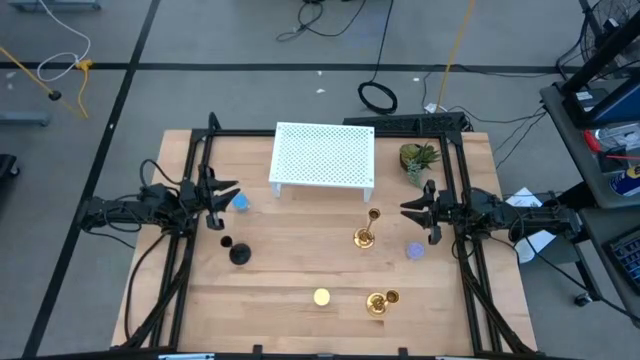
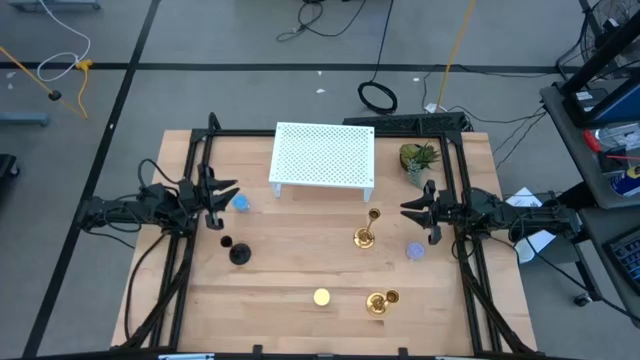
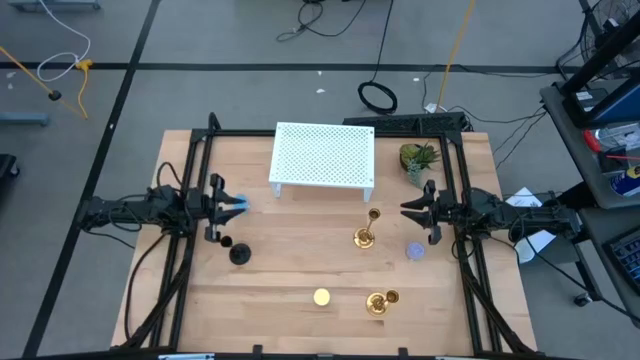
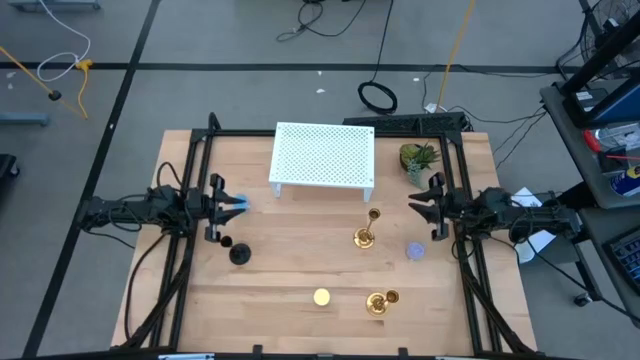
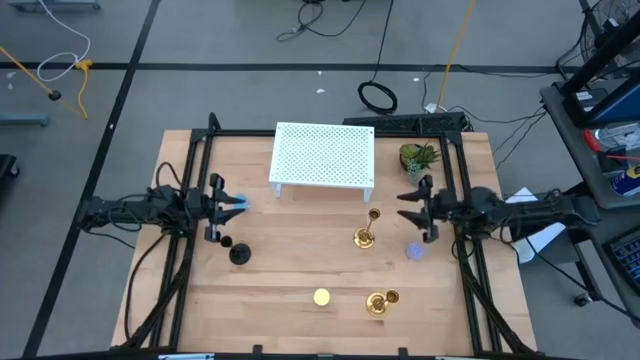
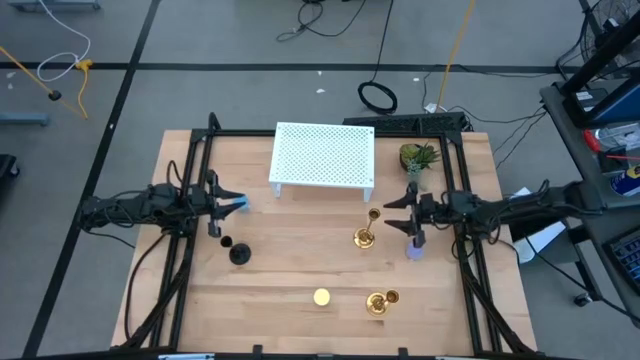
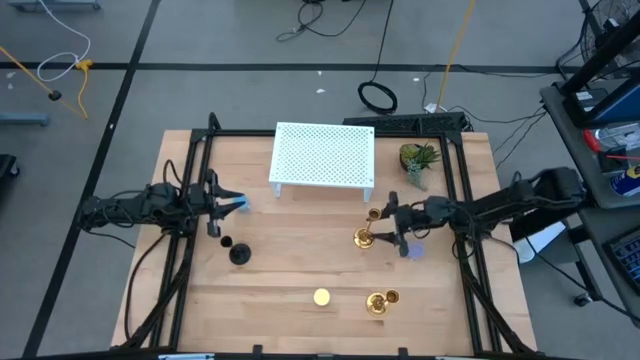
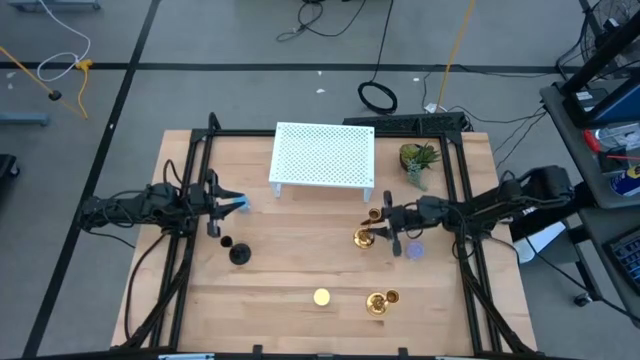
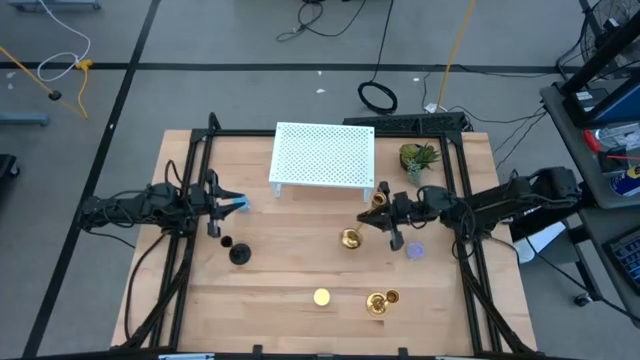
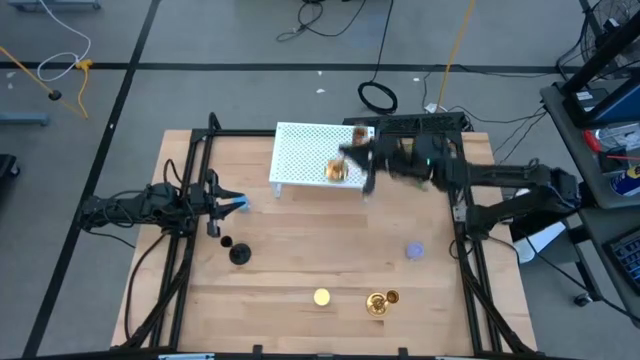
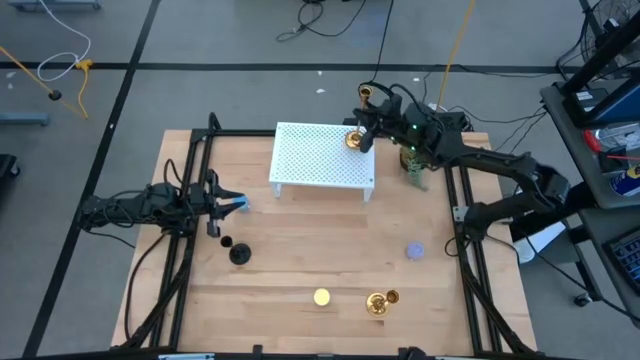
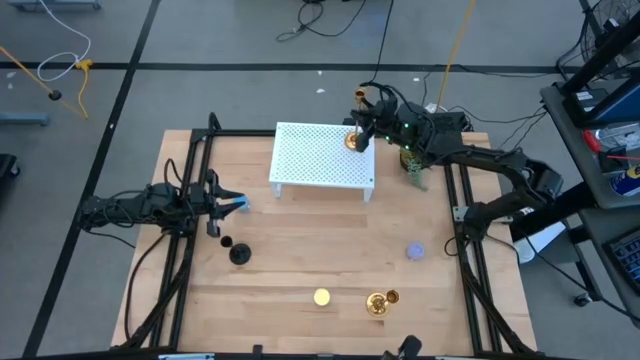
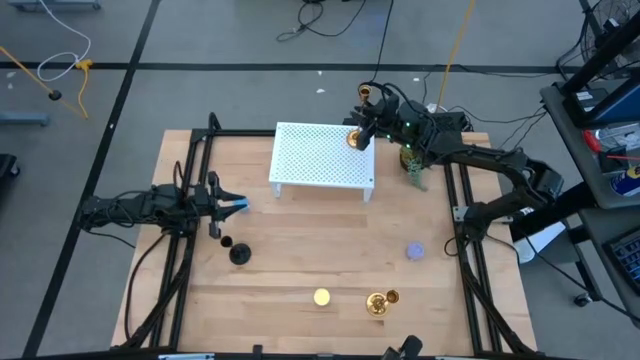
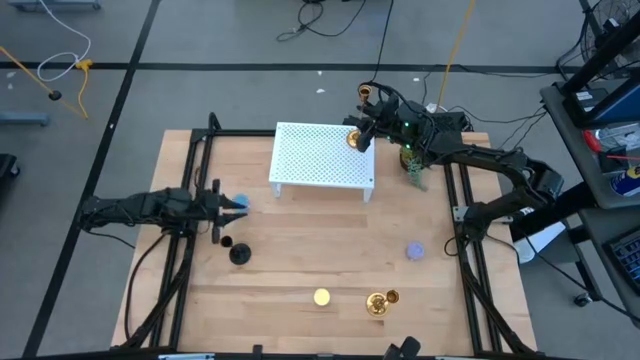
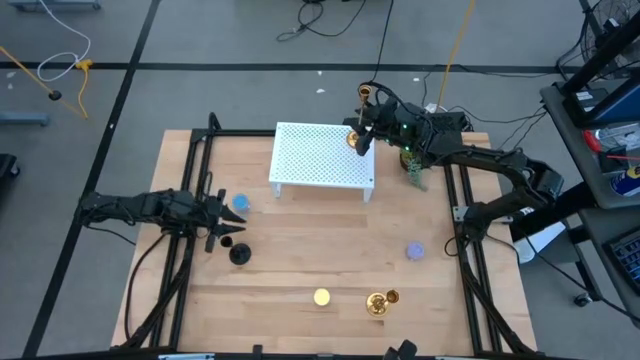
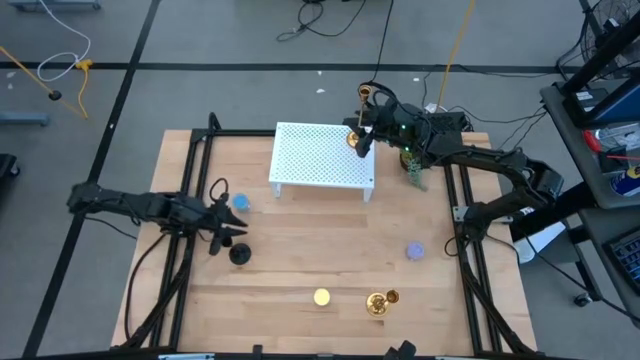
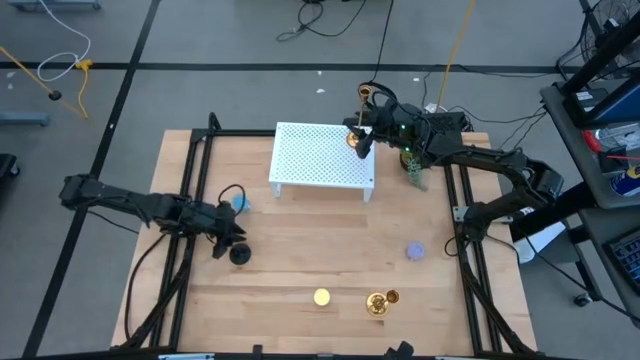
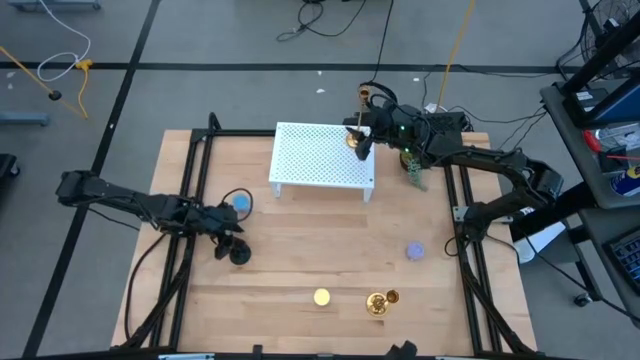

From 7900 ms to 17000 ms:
Task: Pick & Place candle stick holders
Put the top gold candle holder on the shelf

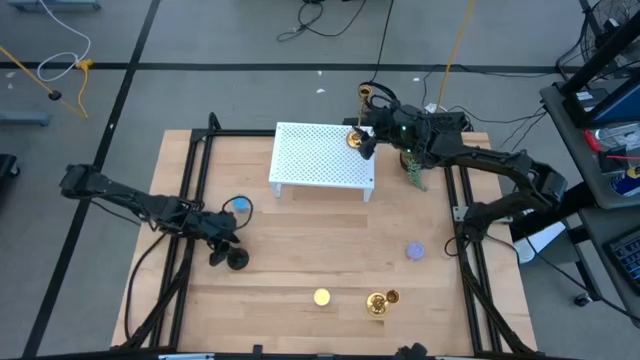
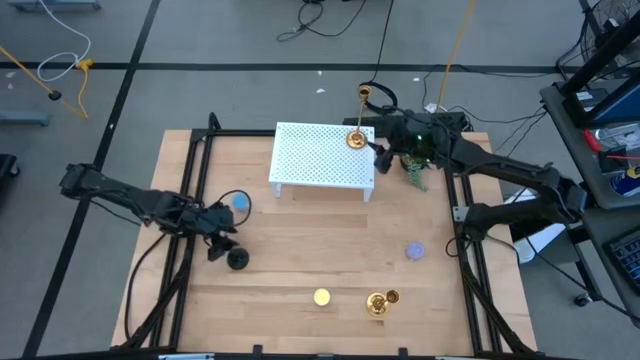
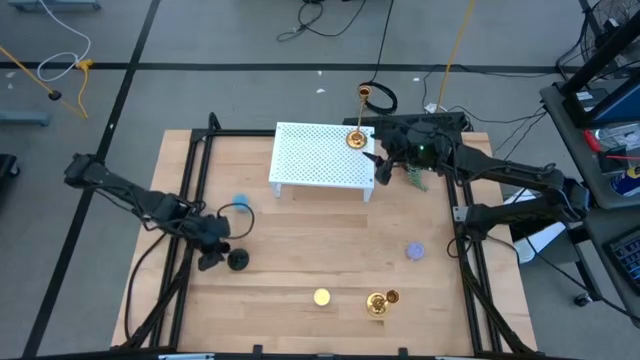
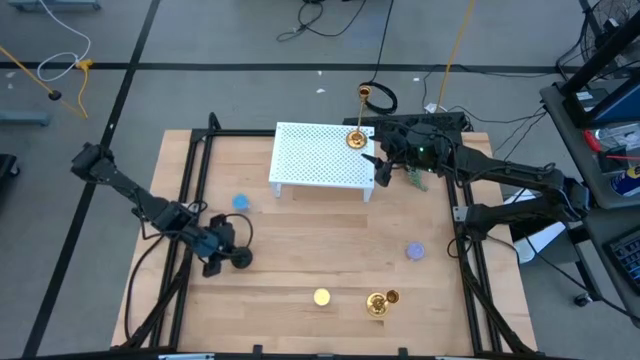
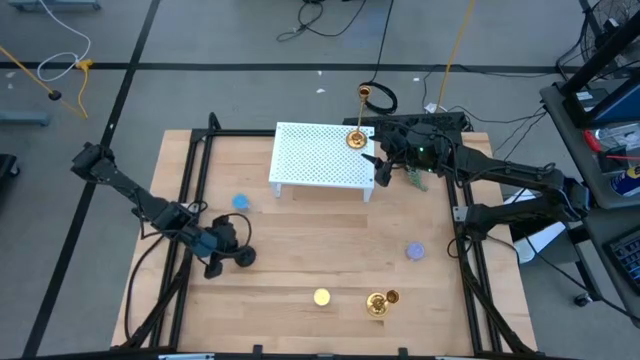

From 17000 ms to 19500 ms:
Put the black candle holder on the shelf

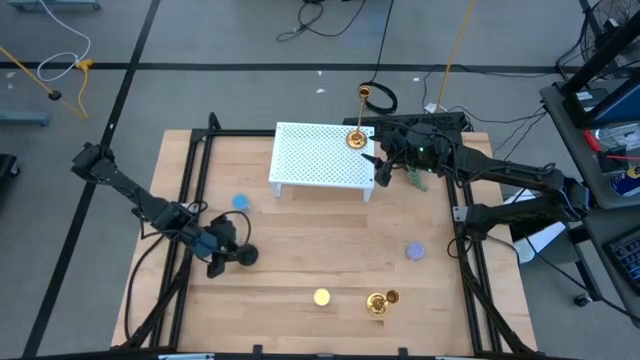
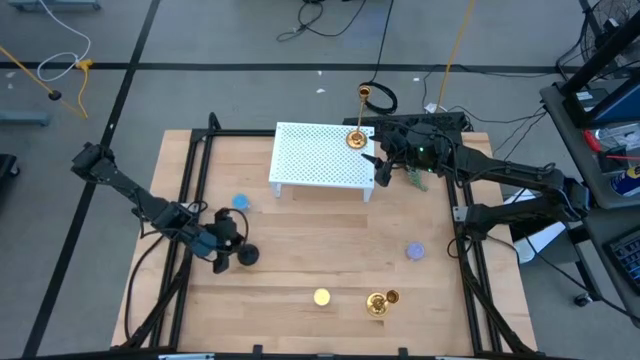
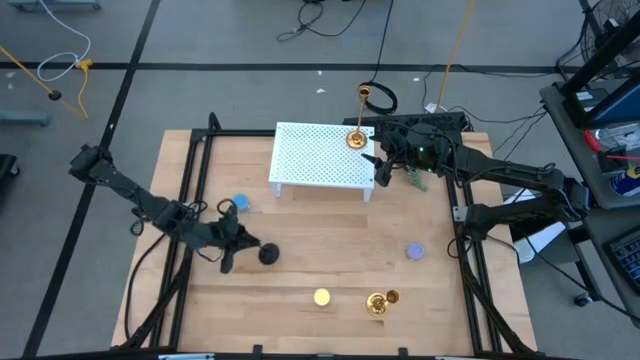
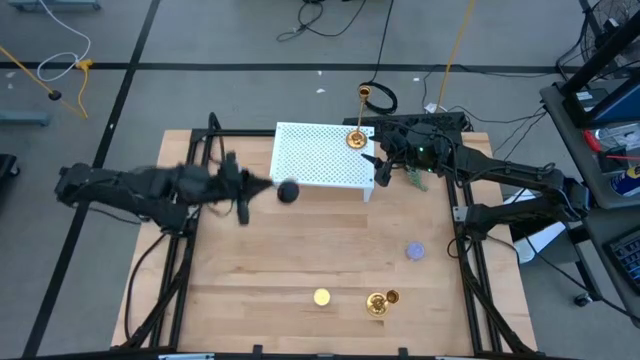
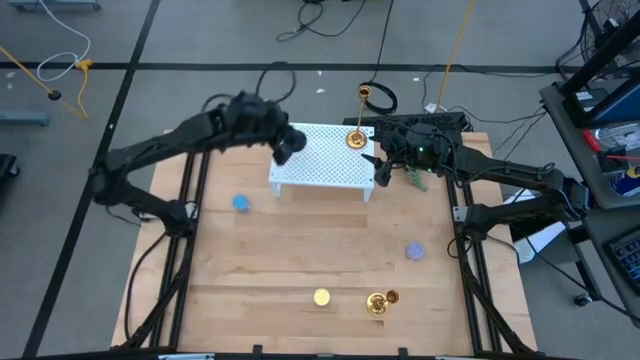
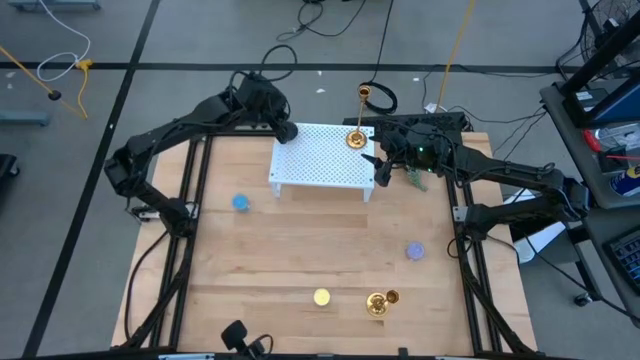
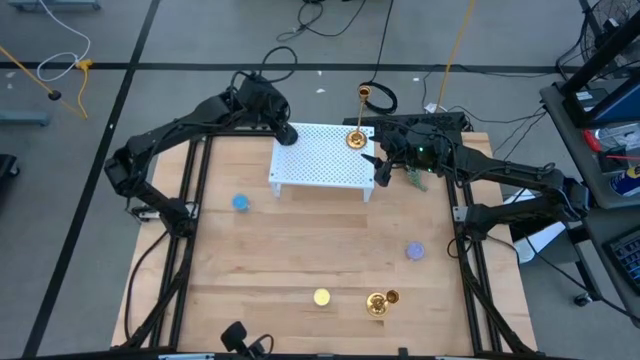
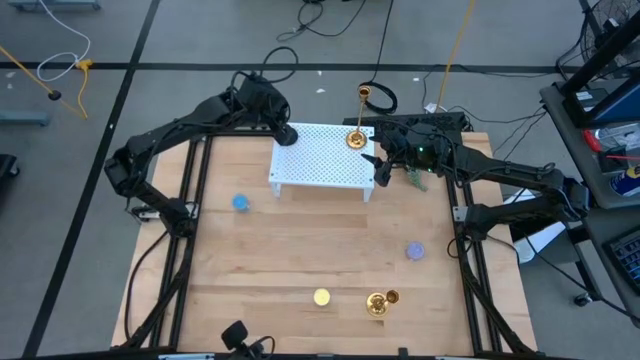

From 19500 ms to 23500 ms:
Put the black candle holder on the shelf

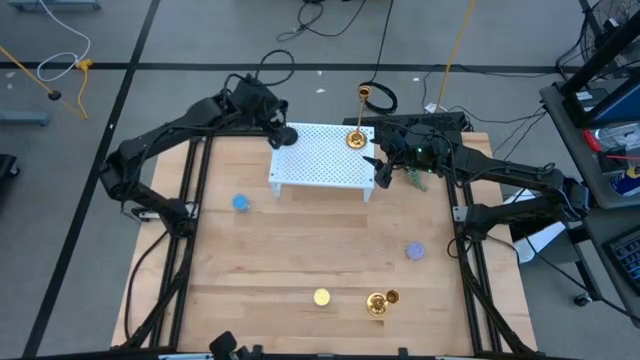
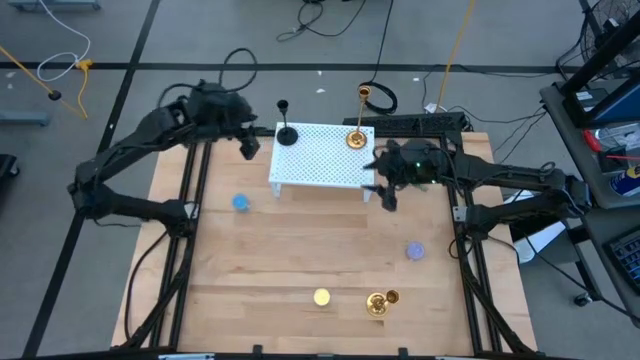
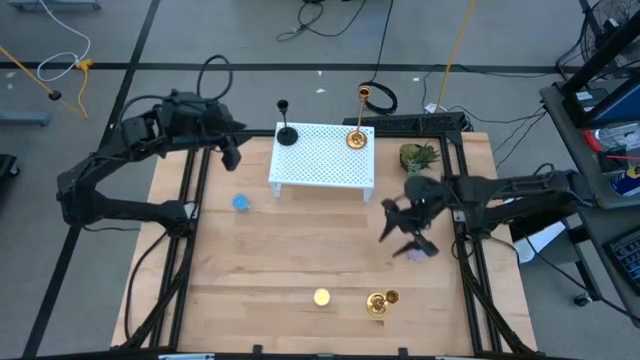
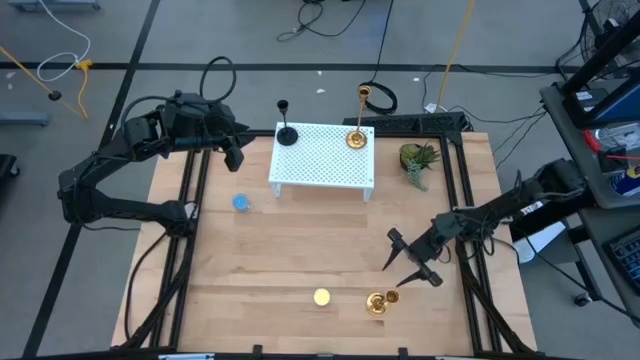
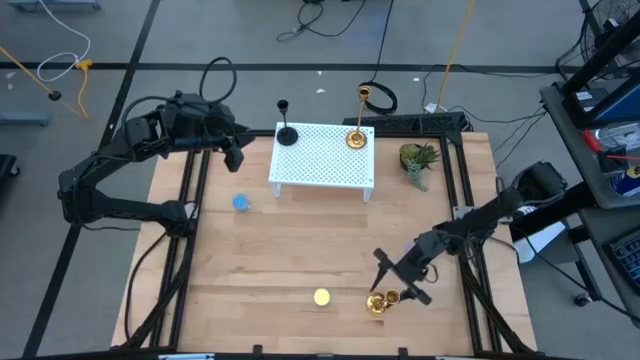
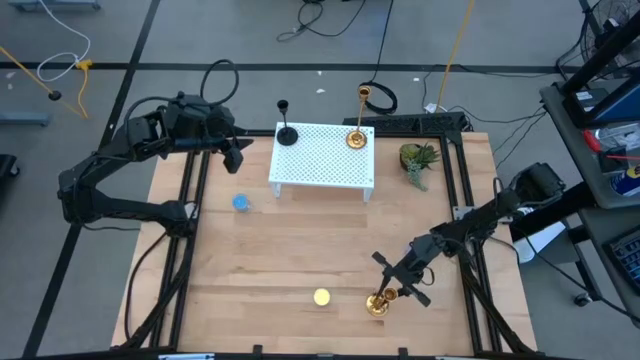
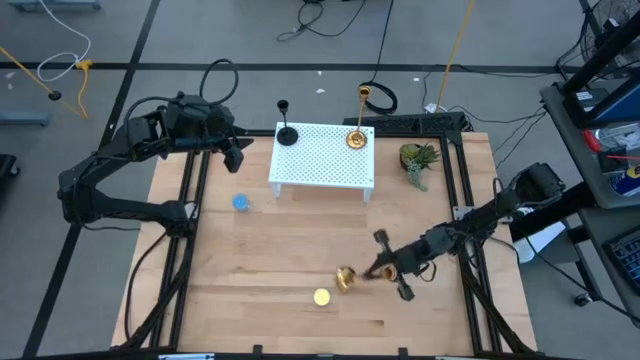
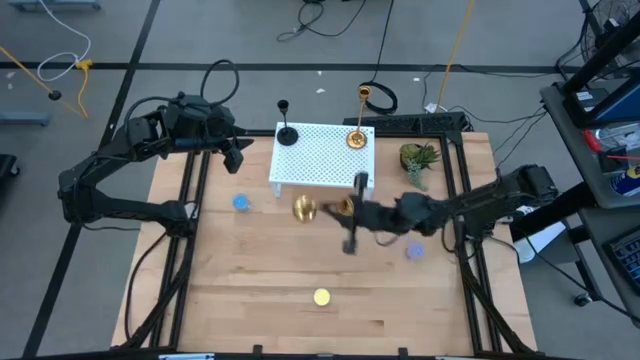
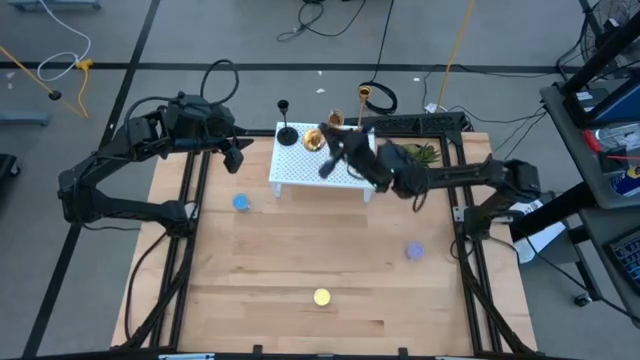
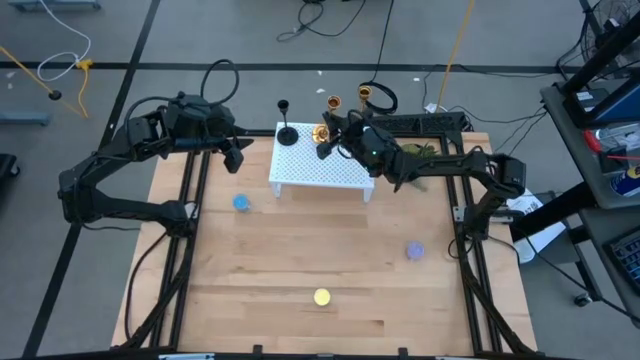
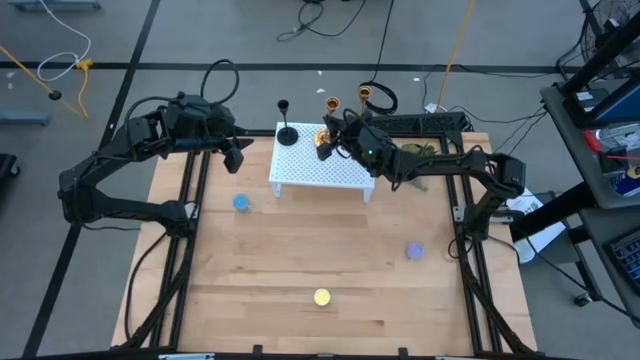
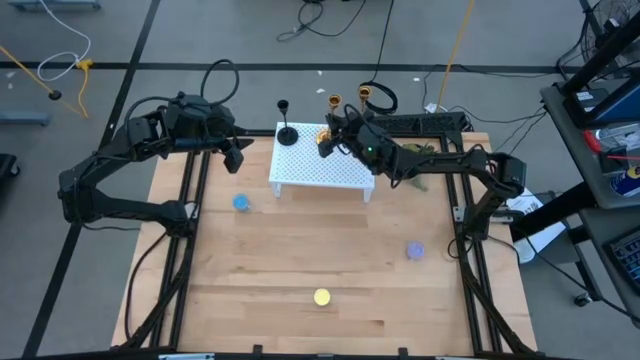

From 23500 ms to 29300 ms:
Put the gold candle holder on the shelf

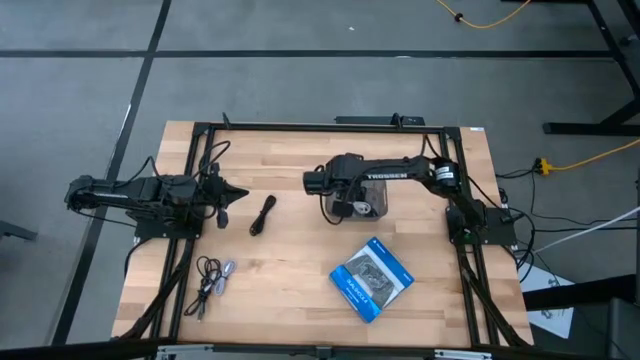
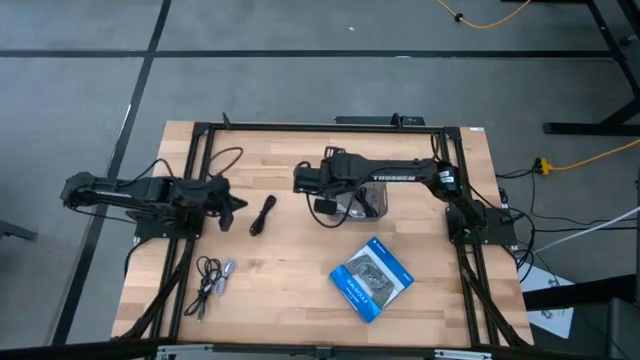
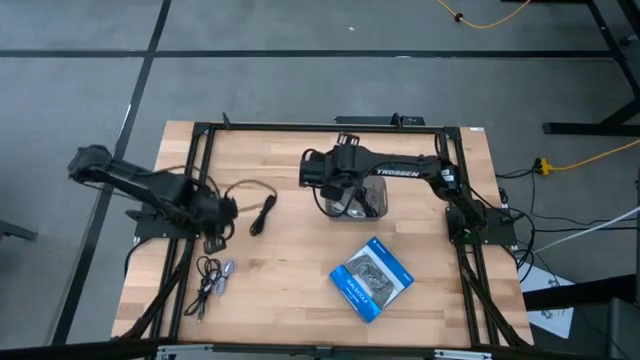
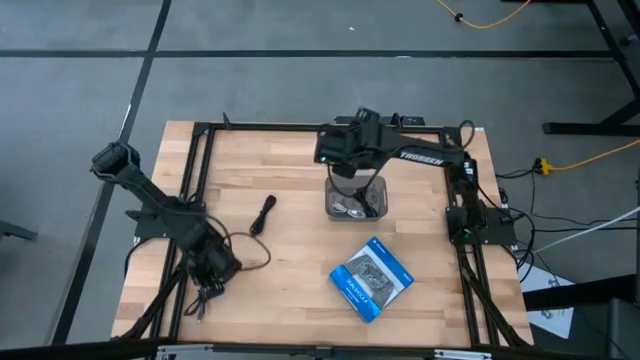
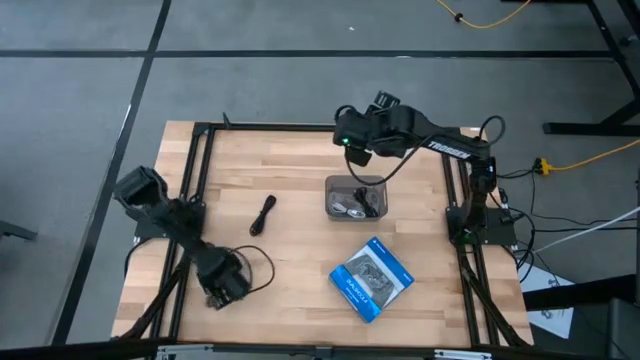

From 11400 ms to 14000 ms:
Task: Pick and place USB-C Cables
Move the charger cables to the center of the table
